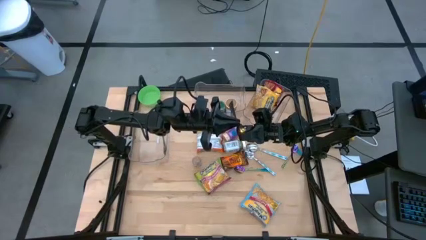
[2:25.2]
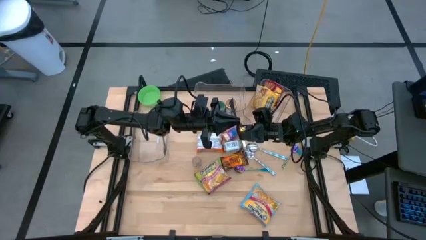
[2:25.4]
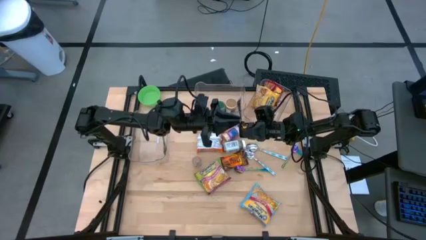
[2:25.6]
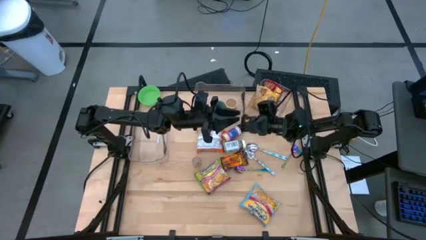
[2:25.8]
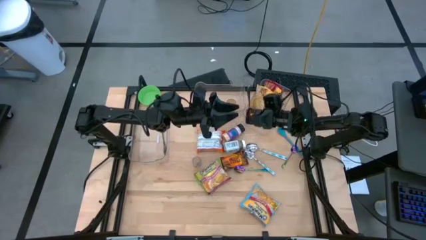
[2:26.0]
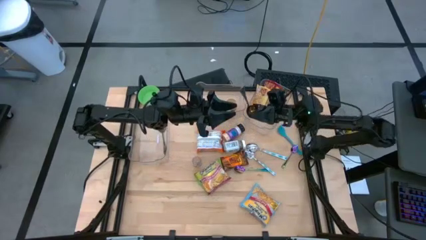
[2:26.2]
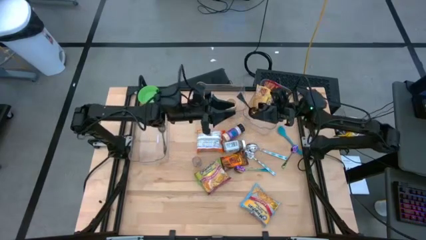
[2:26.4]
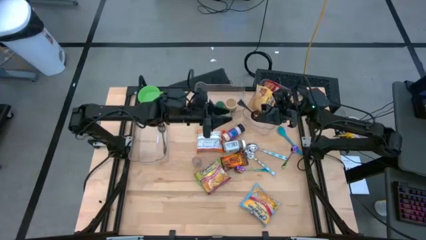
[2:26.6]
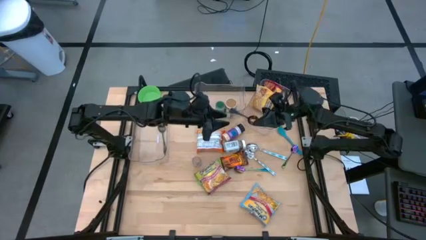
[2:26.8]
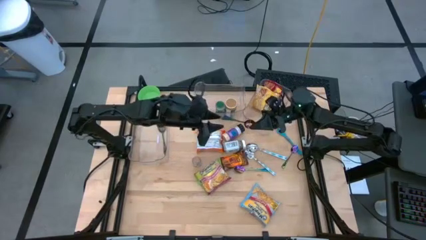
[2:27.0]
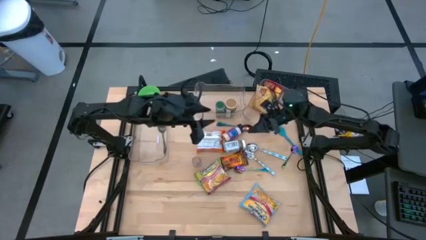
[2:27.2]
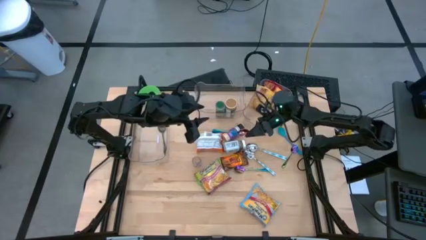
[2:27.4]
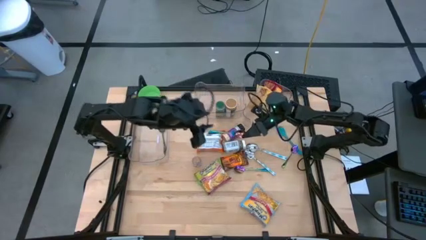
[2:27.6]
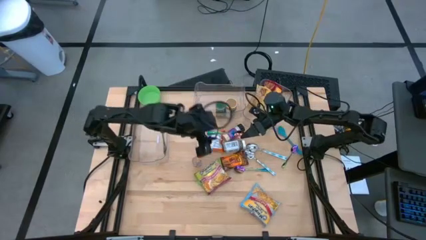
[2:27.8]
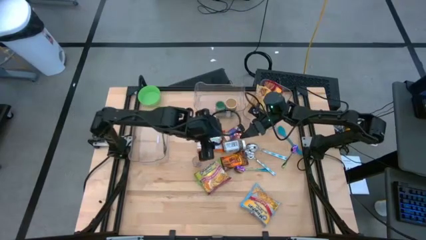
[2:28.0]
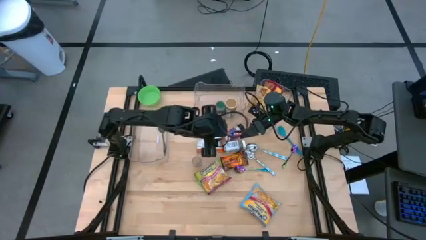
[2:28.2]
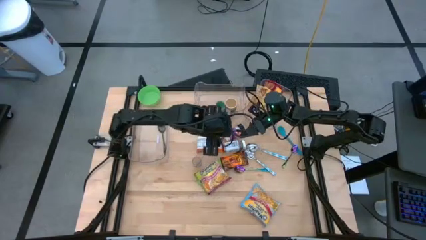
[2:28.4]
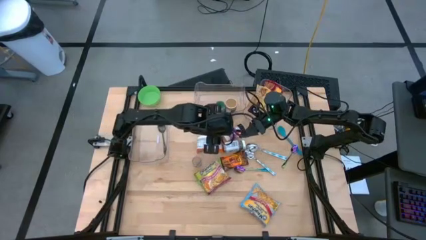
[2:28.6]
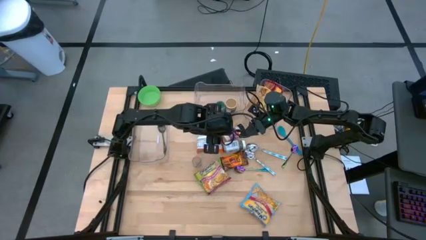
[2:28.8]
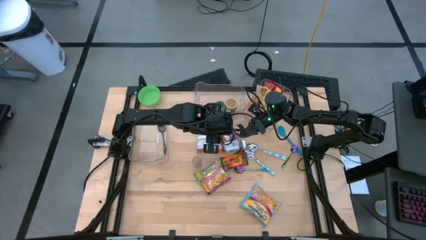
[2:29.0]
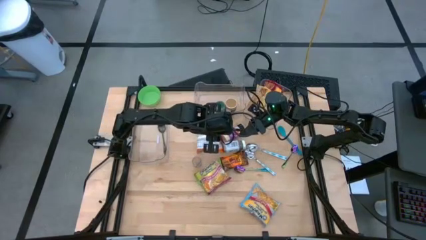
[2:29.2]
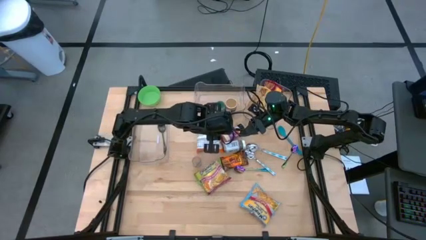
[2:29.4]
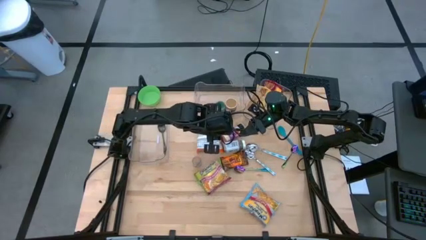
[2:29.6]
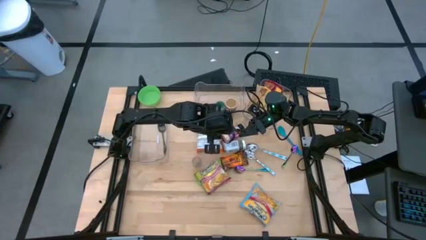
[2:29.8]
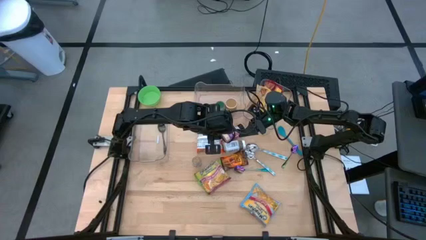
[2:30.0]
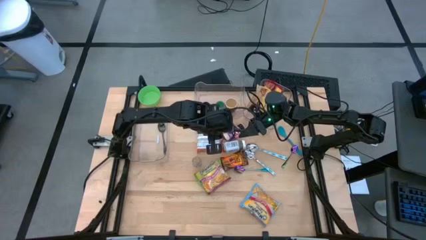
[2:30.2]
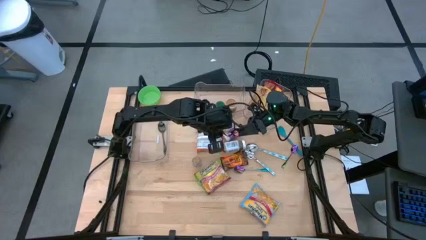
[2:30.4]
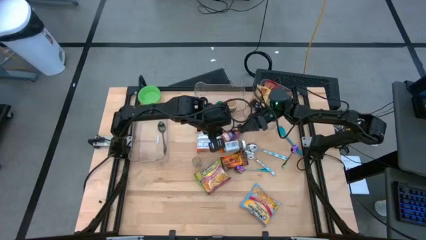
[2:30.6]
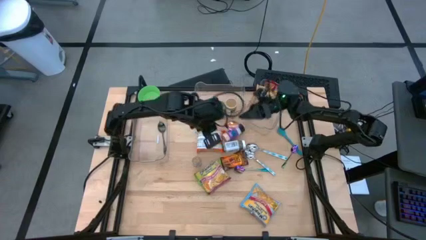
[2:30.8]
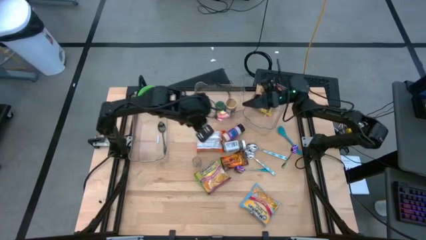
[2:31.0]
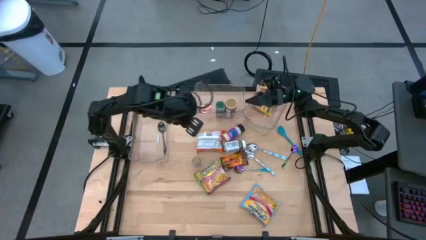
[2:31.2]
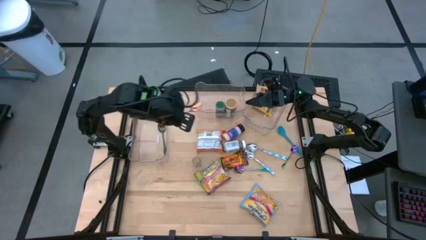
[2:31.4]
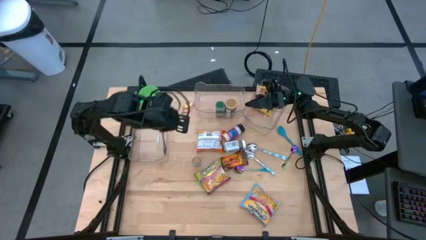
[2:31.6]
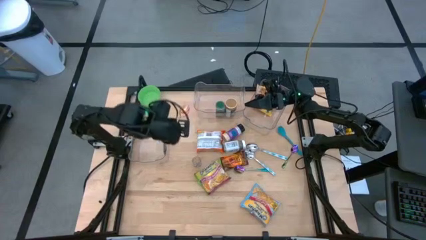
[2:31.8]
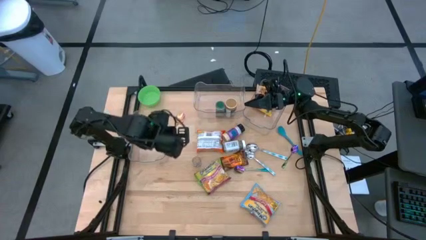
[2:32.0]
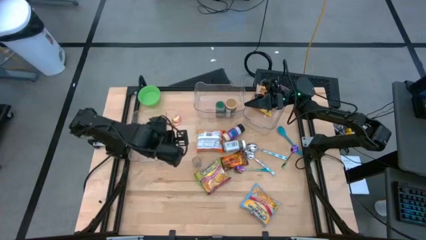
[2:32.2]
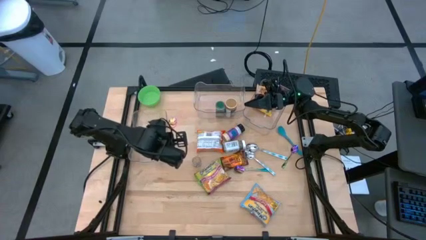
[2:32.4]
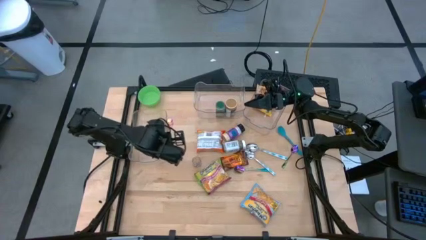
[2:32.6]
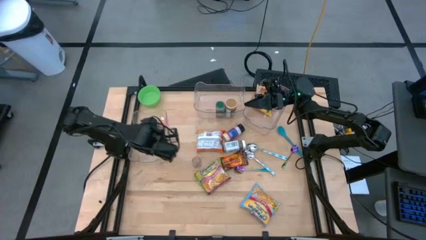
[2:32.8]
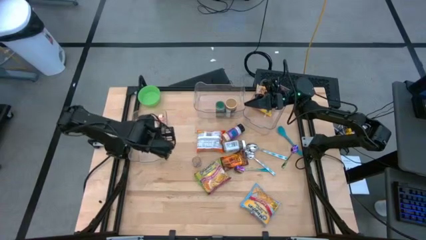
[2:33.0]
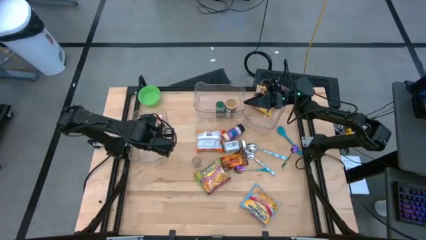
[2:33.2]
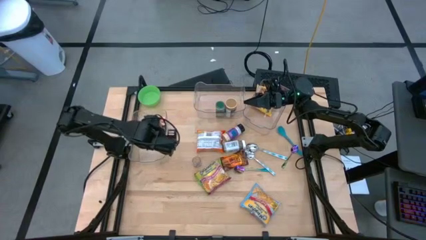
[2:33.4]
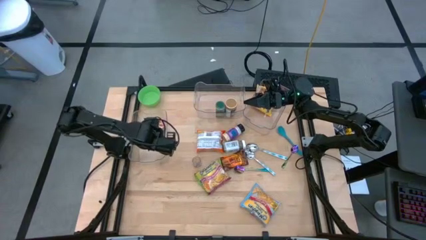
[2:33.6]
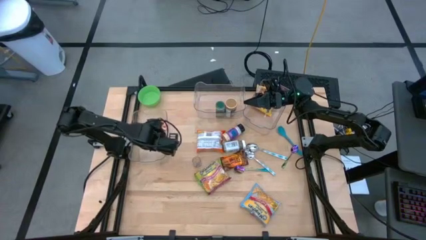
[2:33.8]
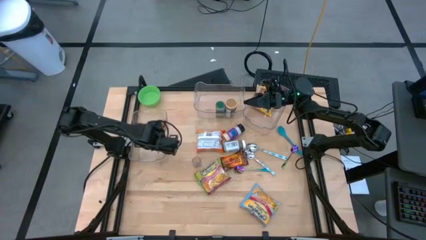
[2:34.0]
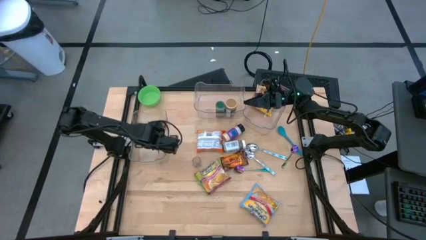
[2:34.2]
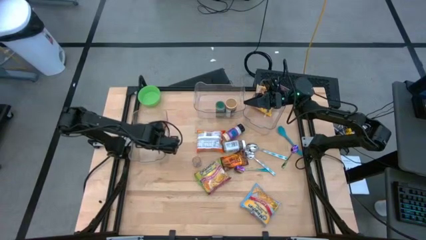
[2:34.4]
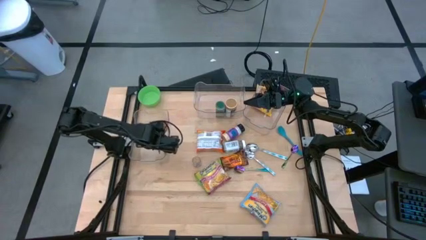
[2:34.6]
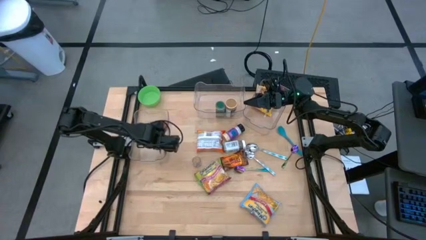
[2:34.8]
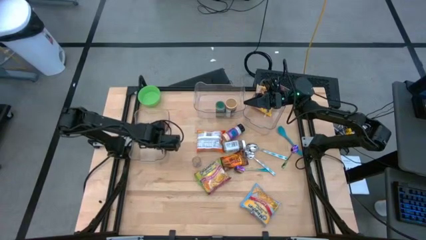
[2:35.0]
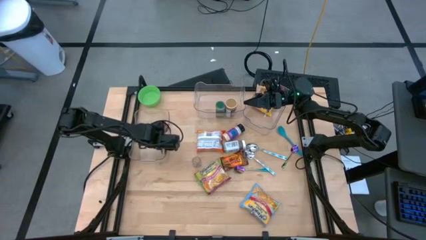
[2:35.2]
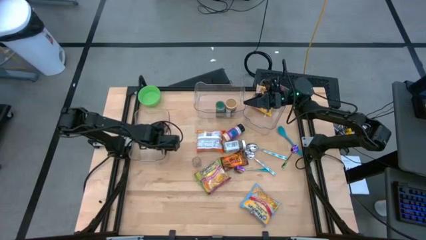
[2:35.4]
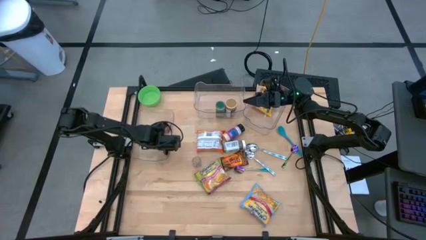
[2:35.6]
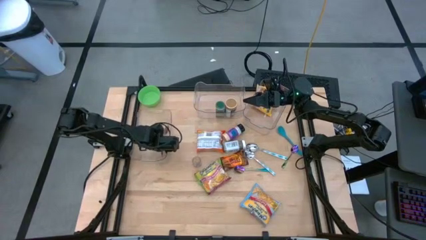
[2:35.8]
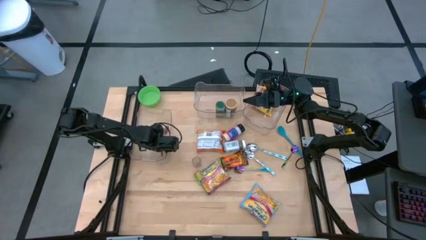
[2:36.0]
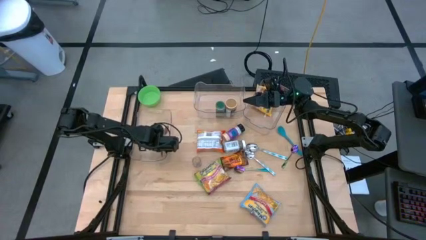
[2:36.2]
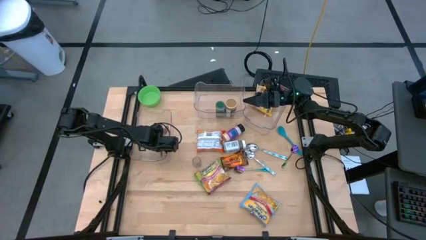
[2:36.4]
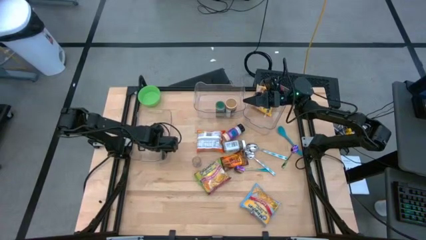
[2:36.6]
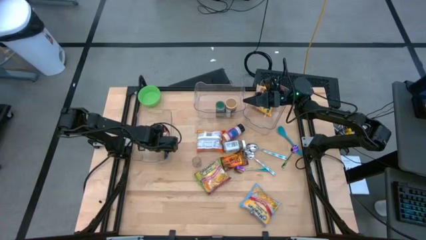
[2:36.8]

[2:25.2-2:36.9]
Task: Pick & Place Food Item
Put the left violet spoon into the left transparent bin

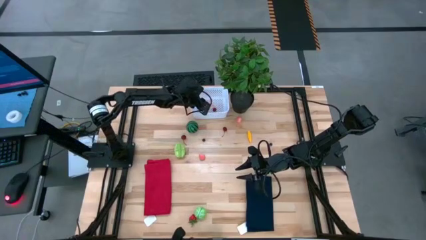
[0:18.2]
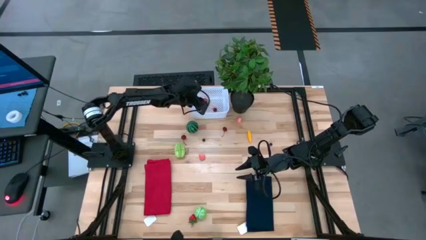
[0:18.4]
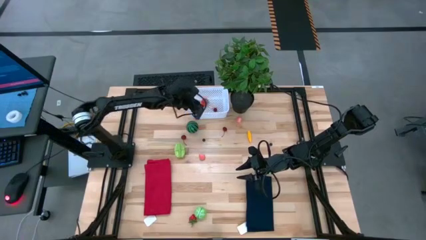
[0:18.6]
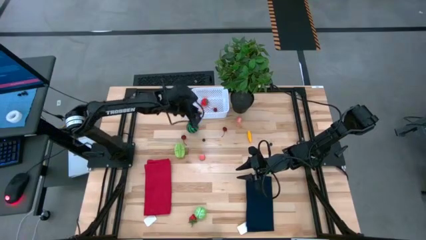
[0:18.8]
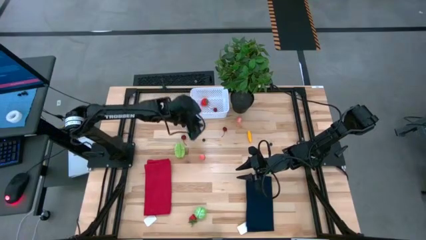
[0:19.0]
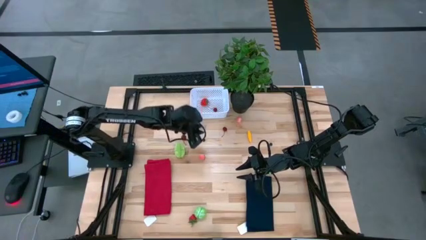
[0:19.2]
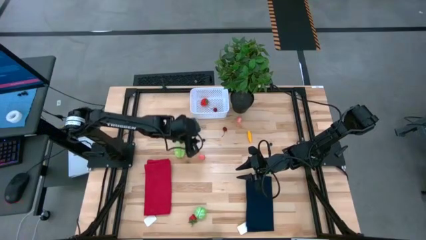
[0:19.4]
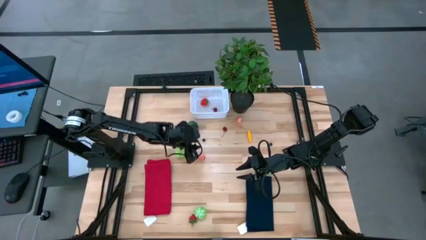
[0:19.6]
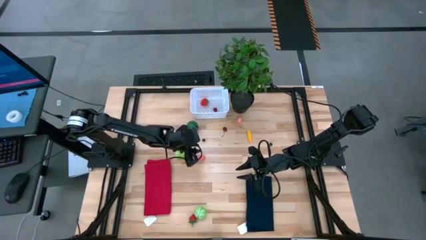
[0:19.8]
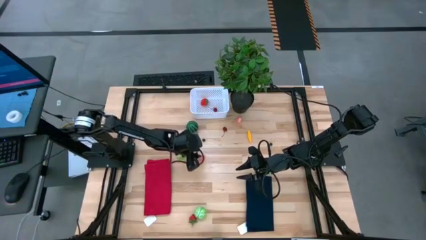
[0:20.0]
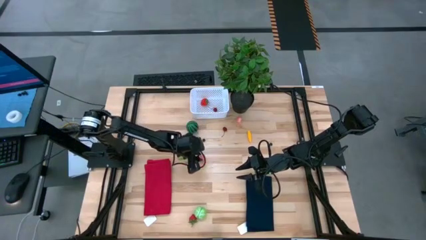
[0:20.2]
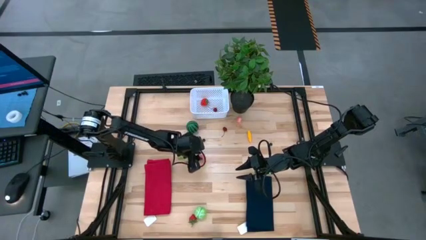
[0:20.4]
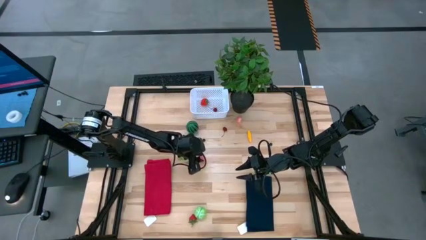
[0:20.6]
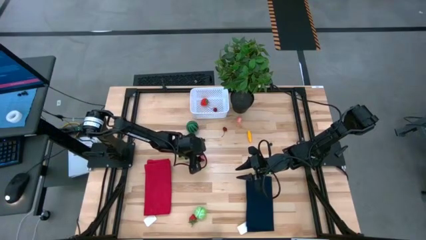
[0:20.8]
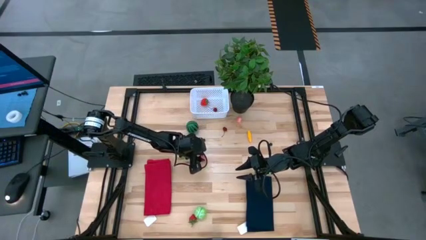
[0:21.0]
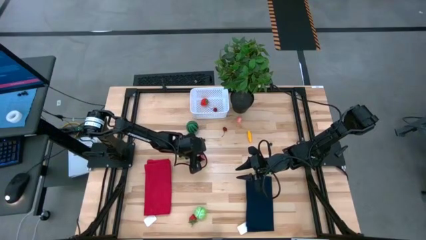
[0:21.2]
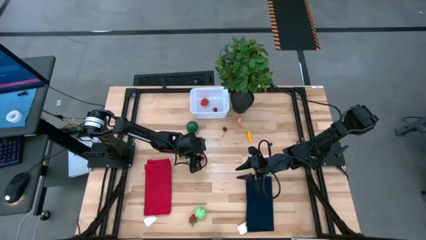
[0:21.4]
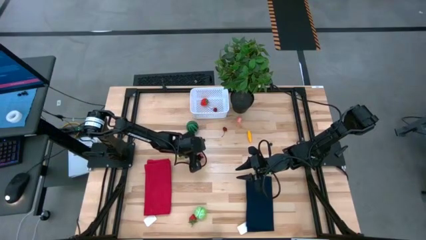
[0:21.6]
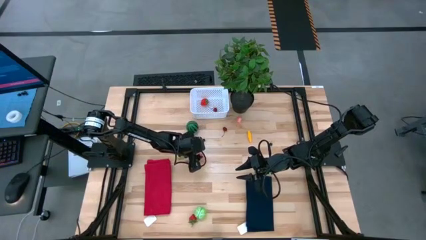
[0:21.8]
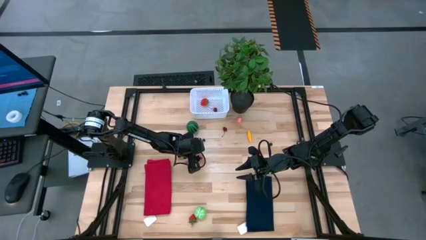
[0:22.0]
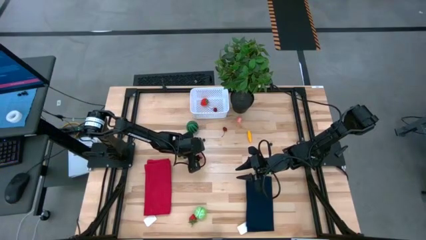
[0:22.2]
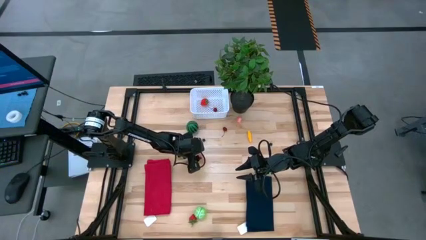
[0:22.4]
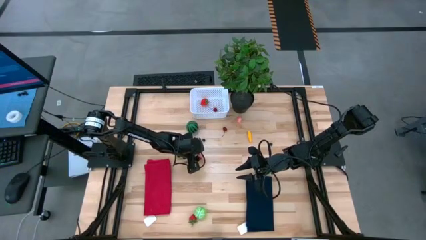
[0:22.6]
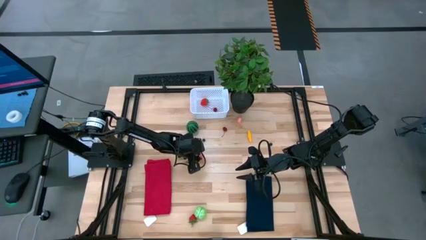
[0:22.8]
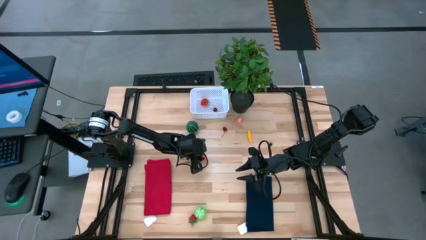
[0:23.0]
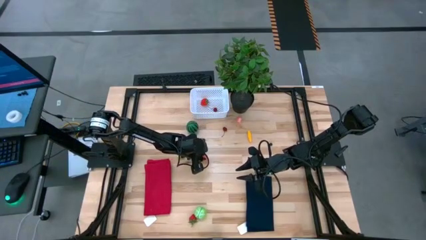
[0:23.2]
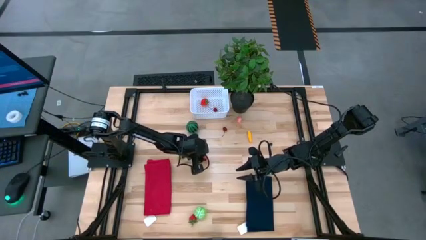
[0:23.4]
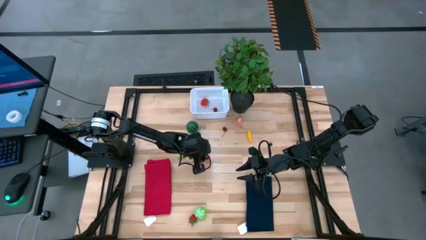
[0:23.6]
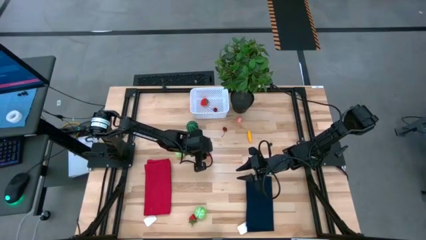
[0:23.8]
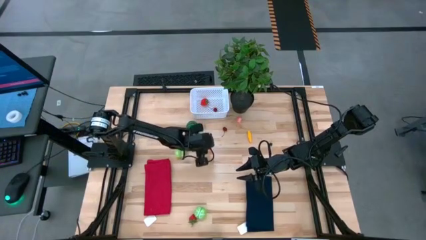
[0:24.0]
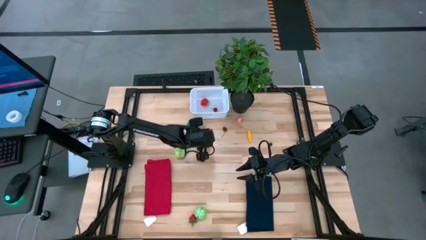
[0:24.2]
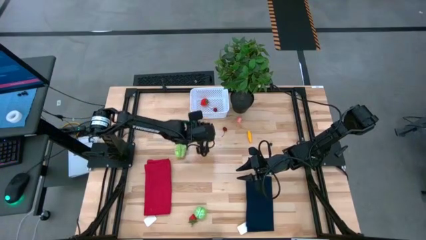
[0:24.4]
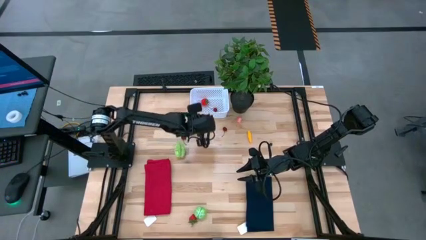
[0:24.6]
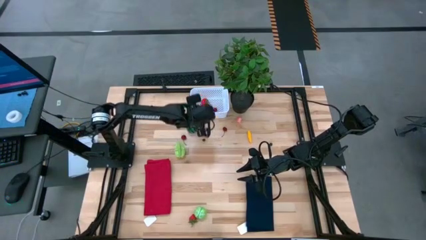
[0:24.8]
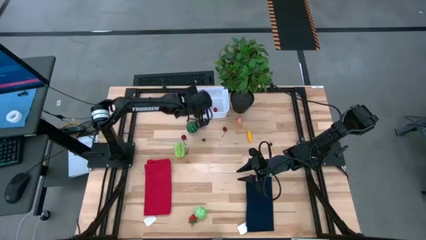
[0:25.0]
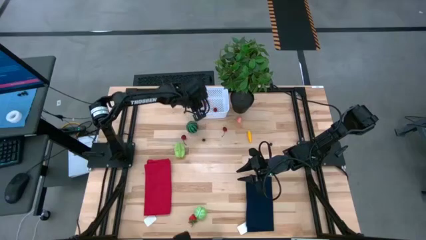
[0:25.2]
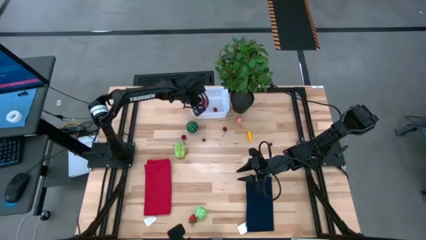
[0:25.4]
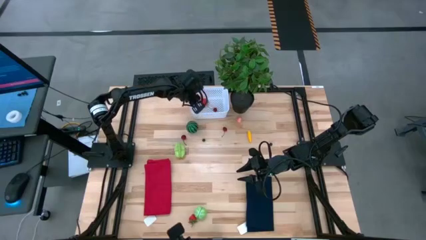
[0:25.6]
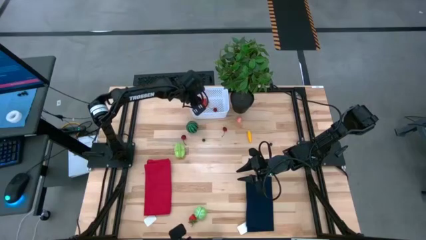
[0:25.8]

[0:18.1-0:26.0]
Task: Pick and placing Produce into tupperware
Put the peach into the white basket
